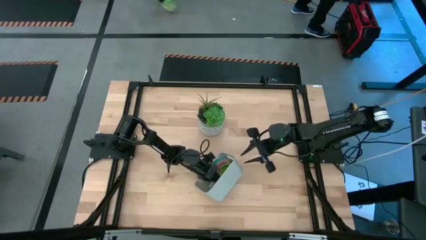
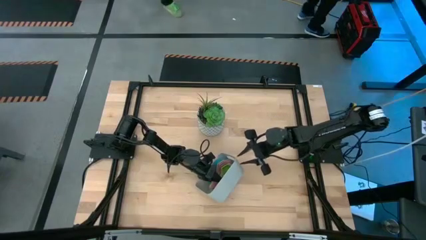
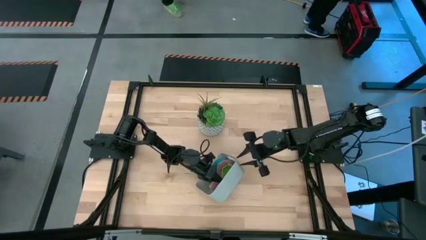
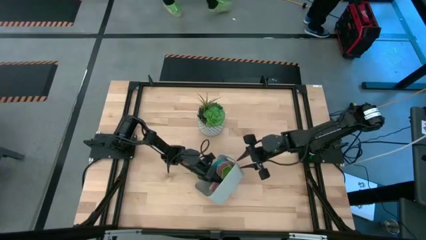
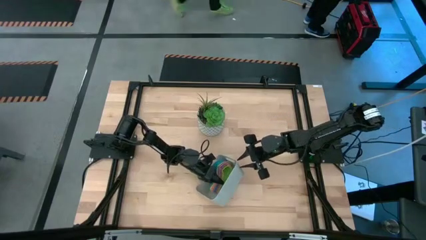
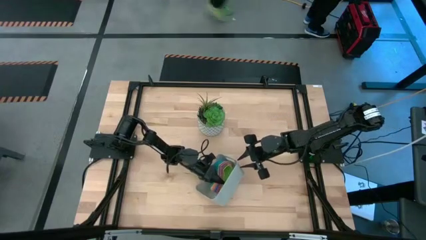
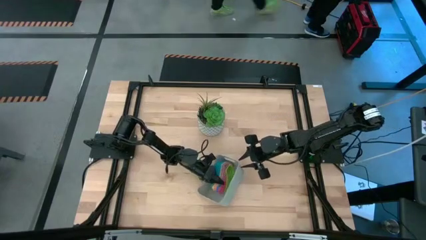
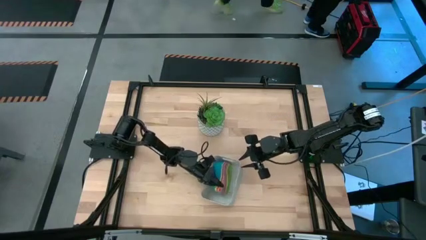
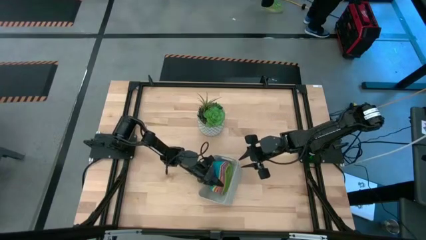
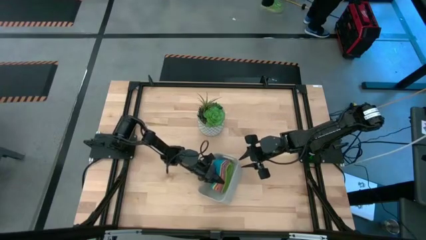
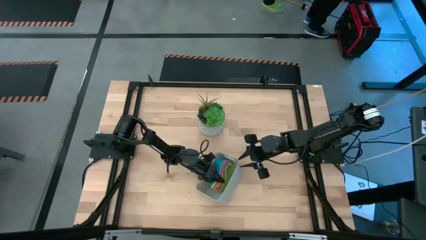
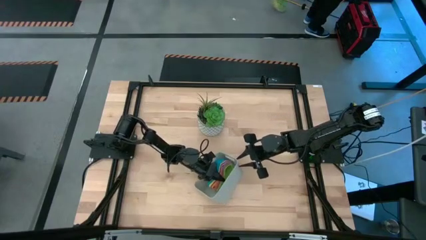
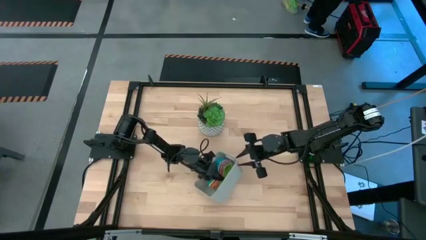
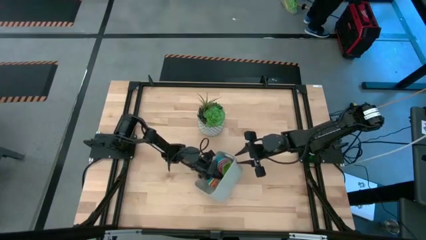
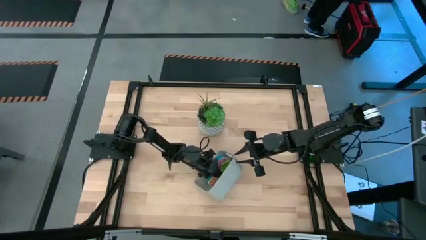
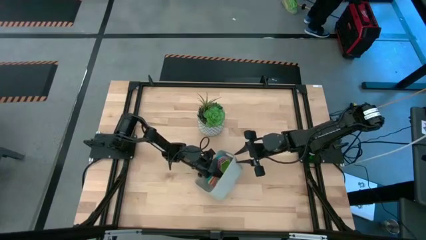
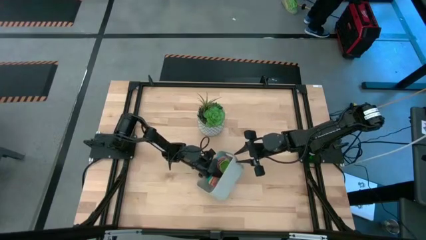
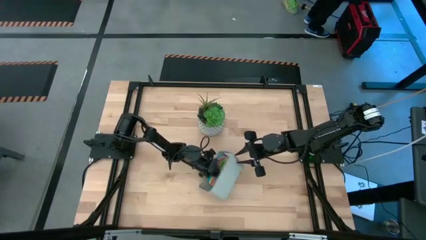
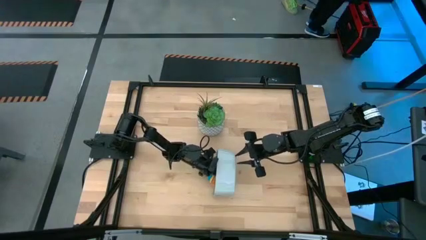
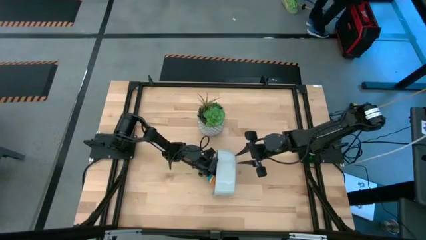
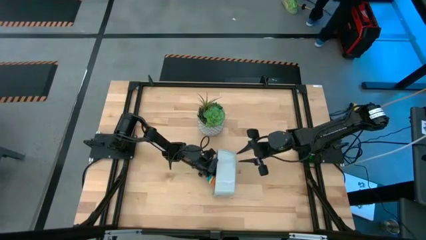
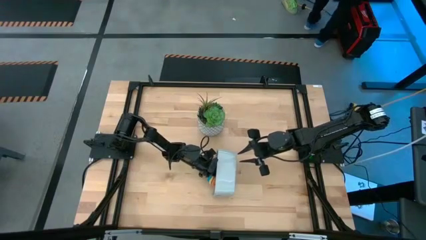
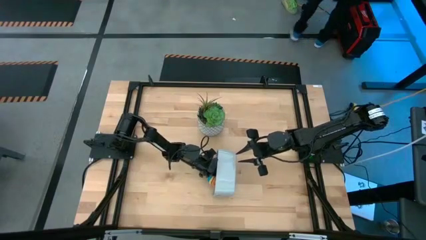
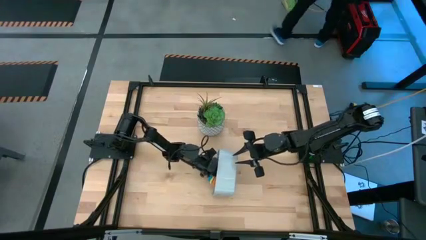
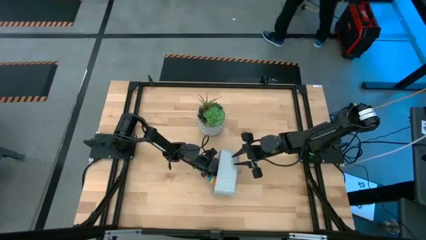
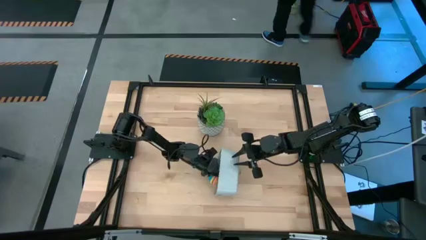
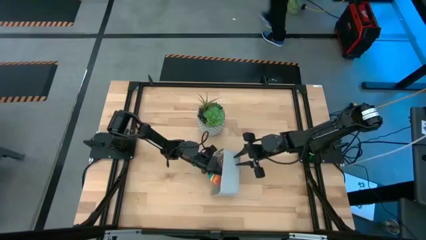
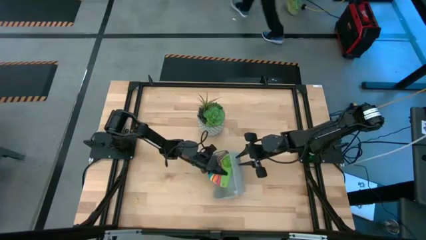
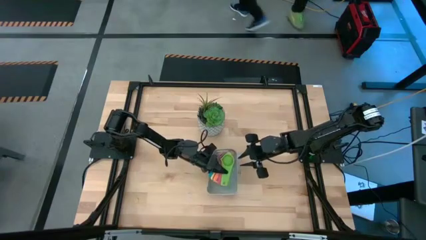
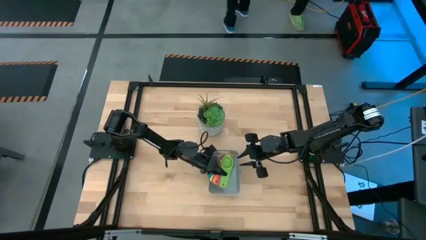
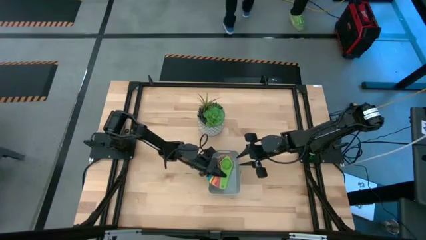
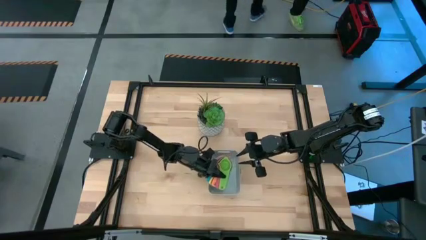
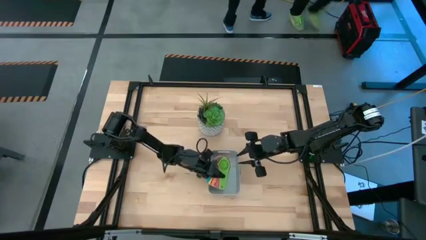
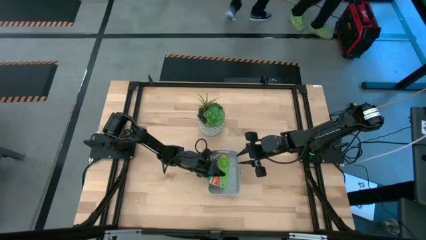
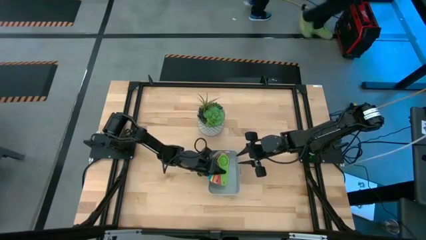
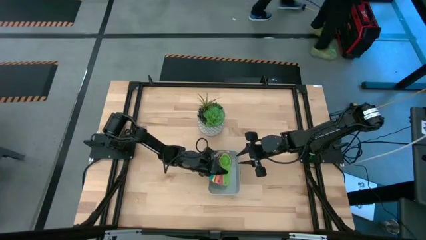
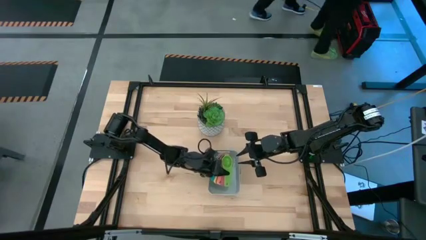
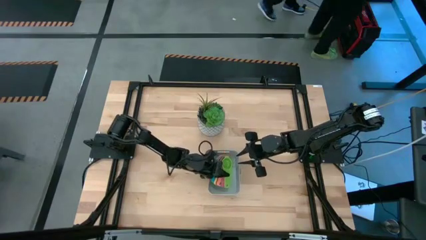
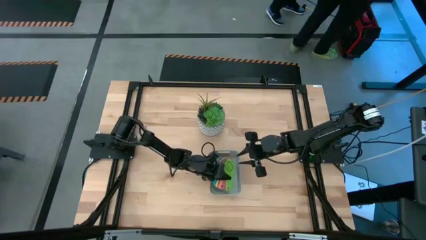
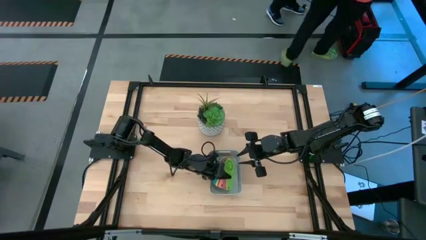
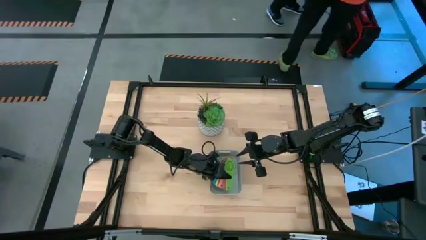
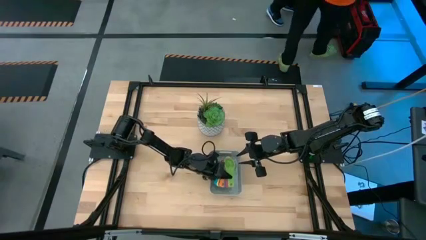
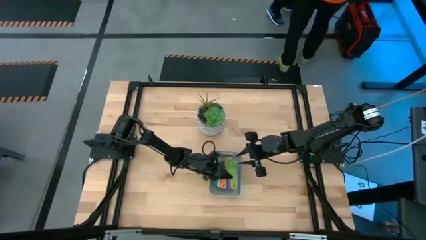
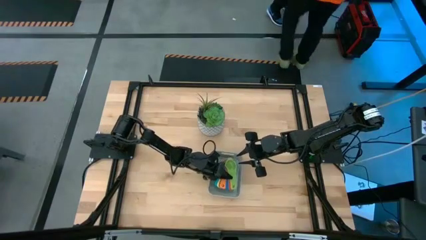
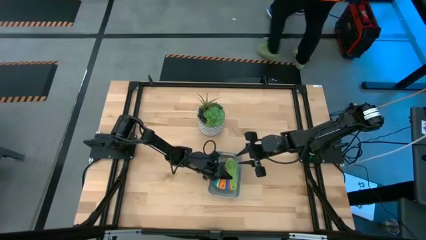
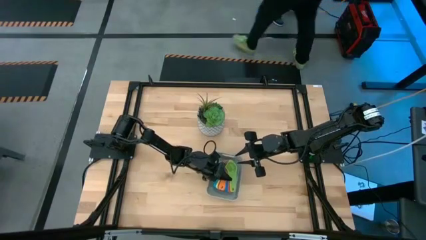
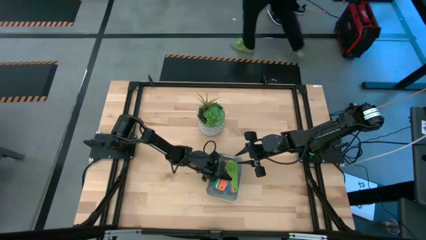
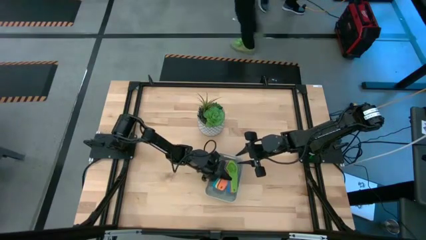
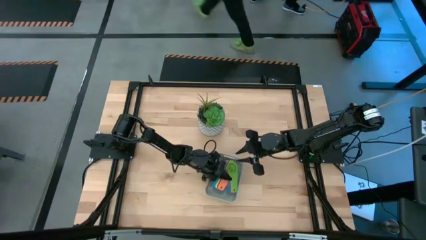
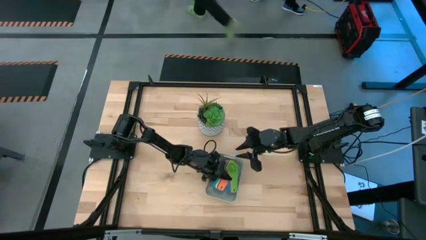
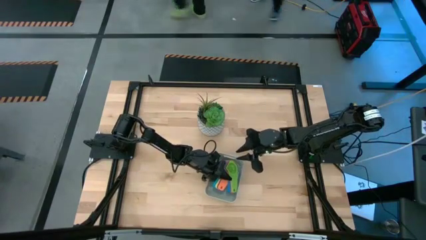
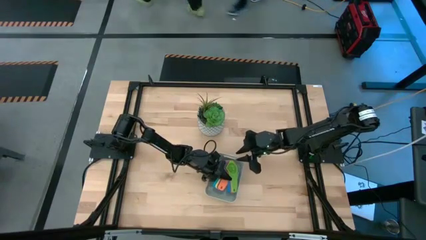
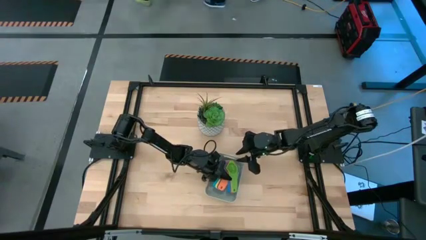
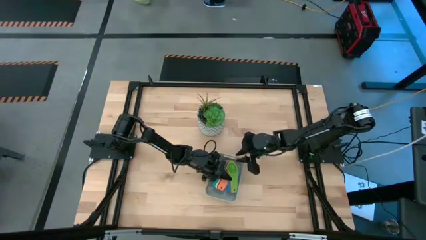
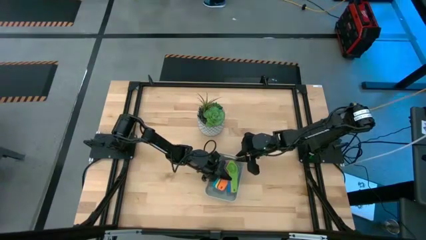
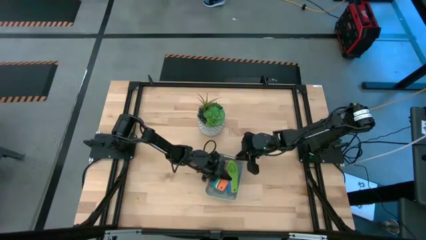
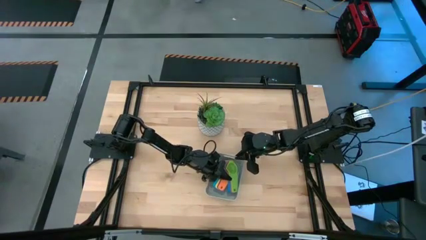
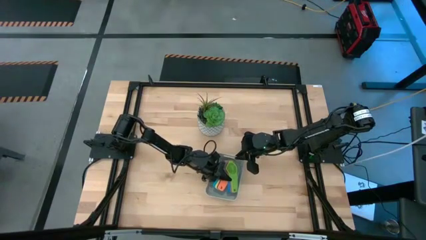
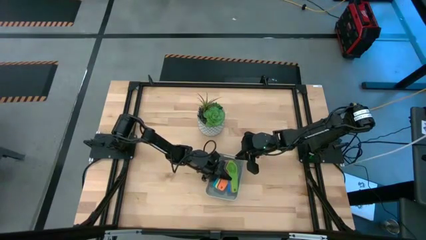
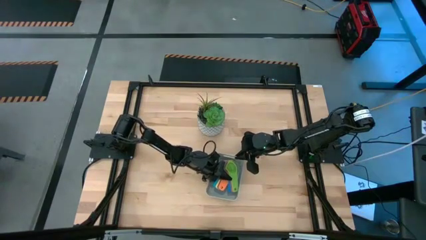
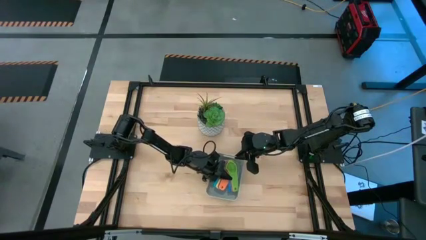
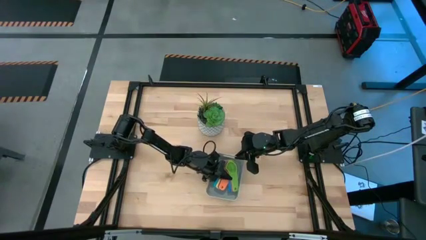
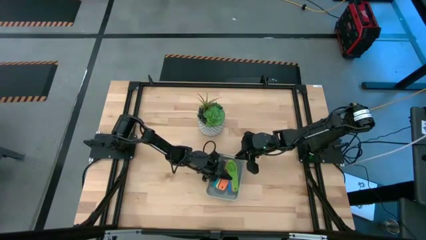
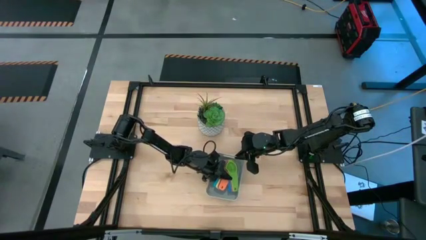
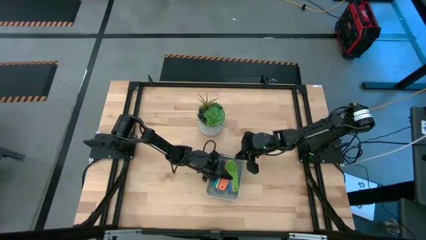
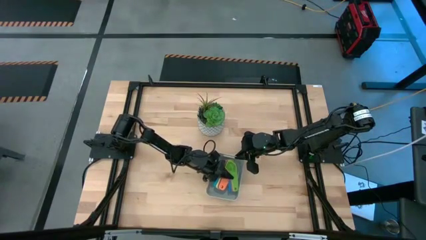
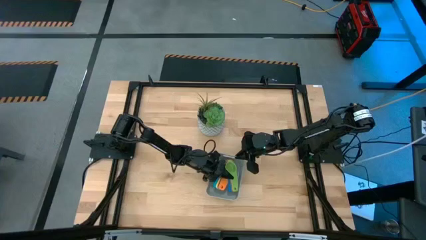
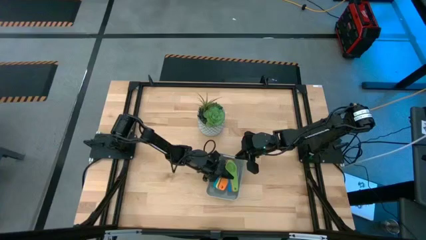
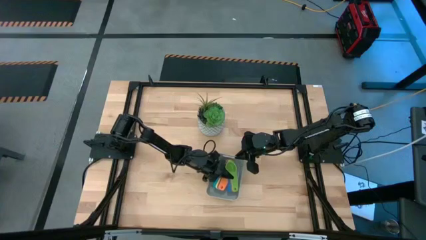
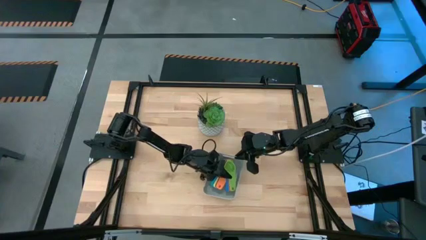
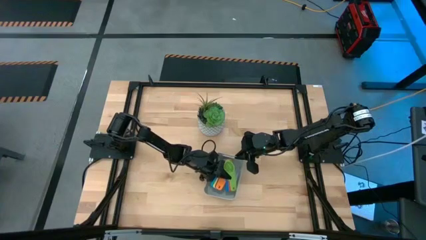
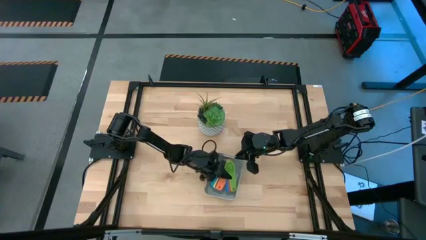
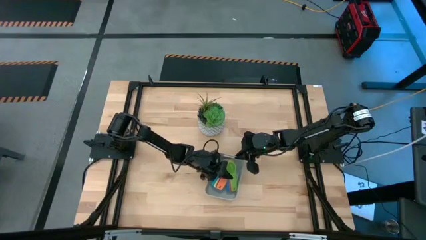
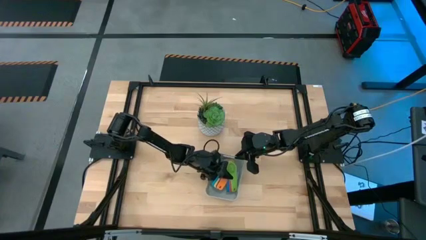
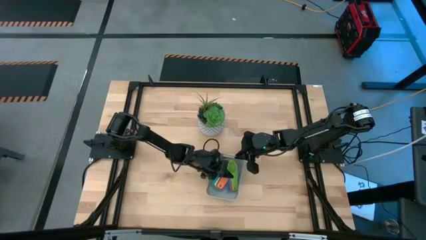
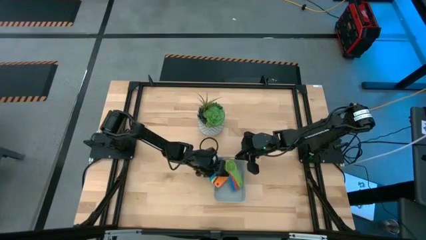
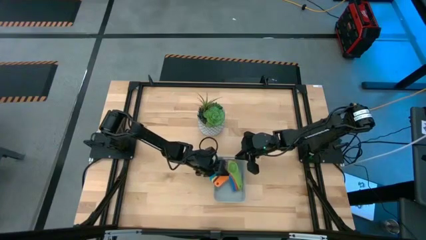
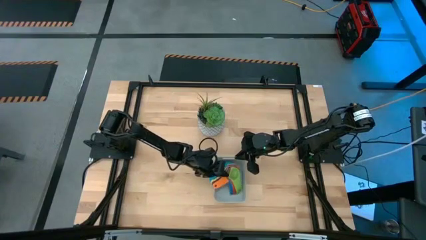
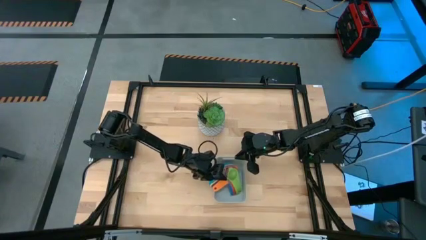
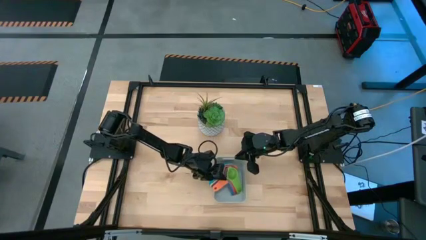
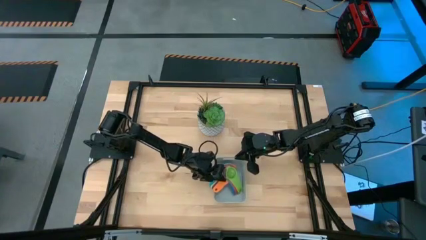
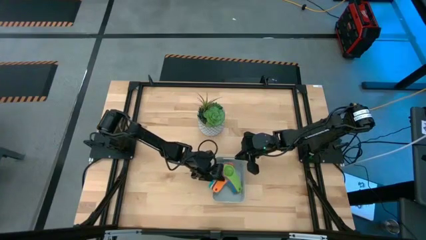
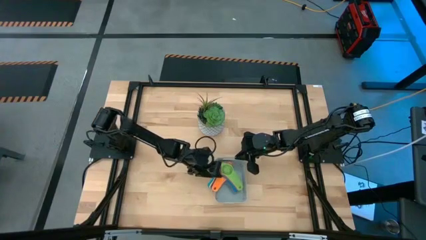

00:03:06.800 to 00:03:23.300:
Task: Nest measuring cups in basket
Put the stacked measuring cups into the bin
